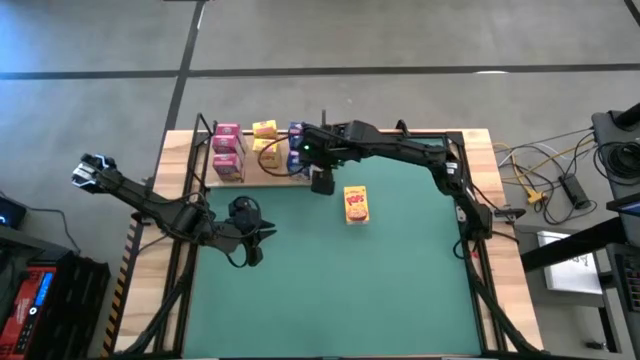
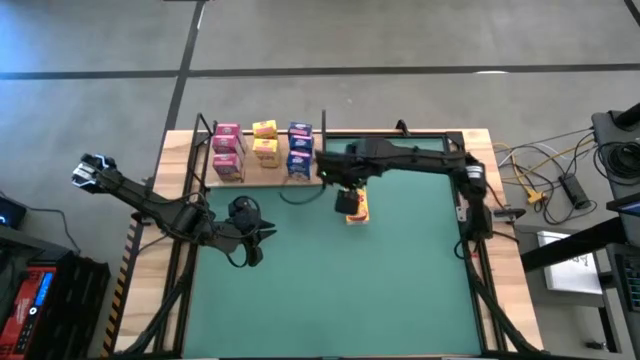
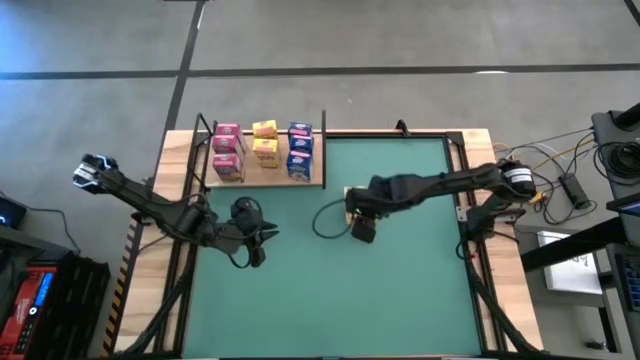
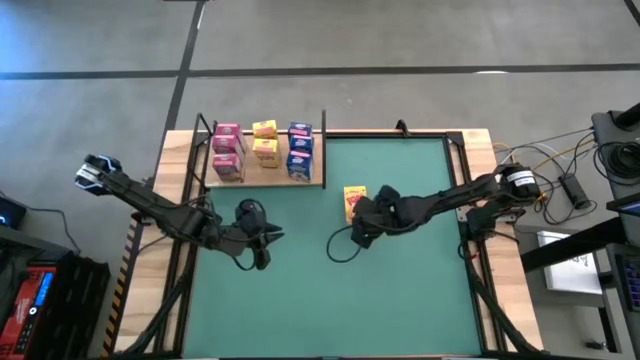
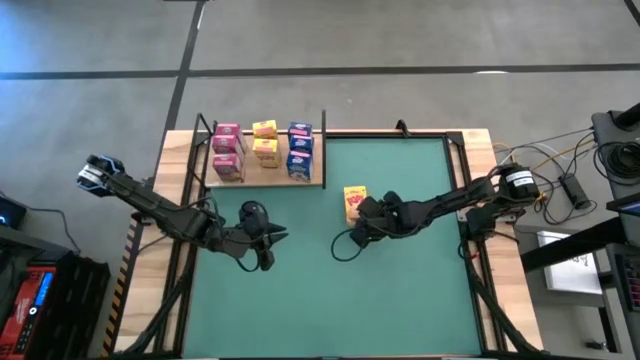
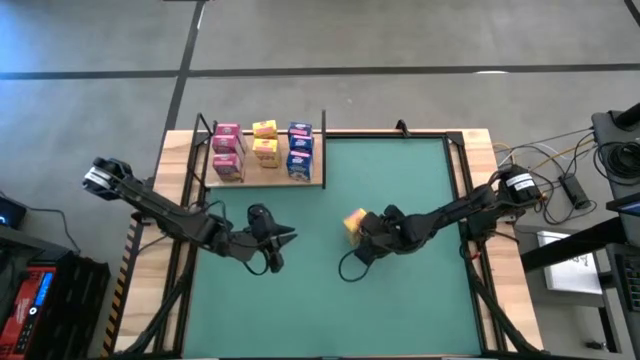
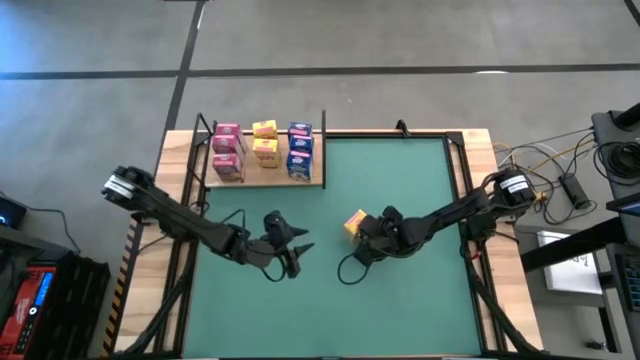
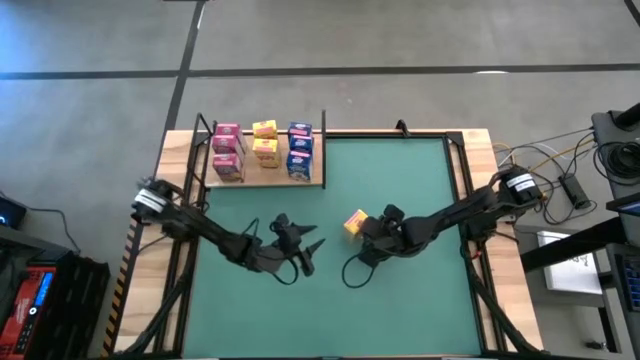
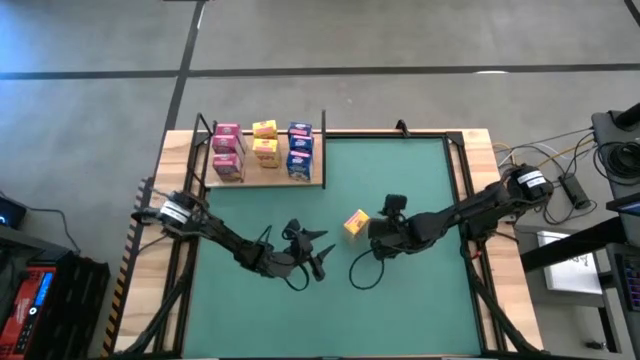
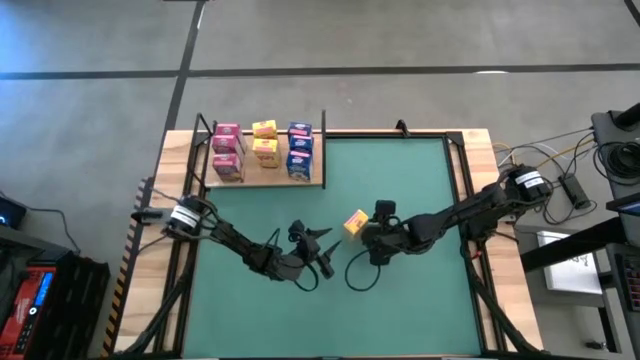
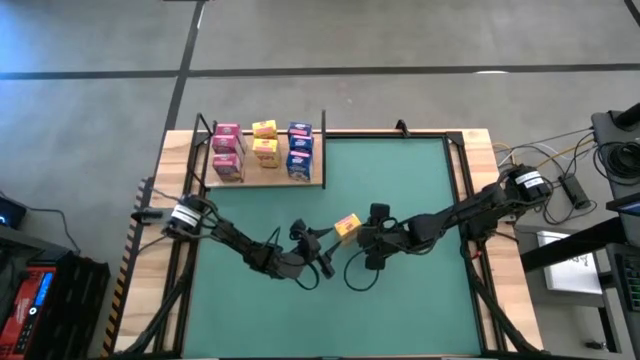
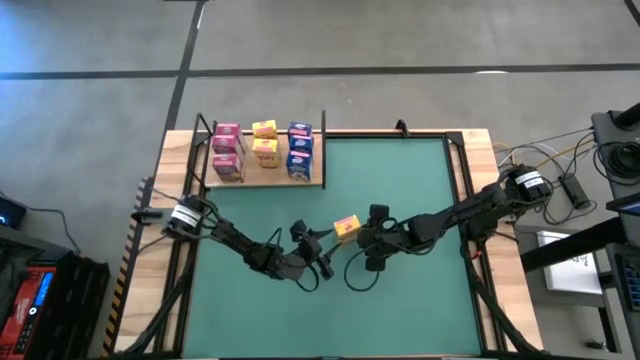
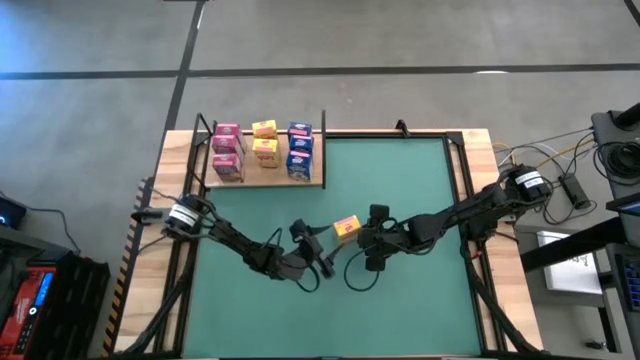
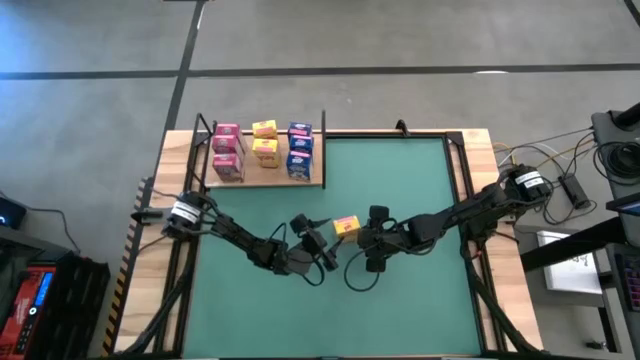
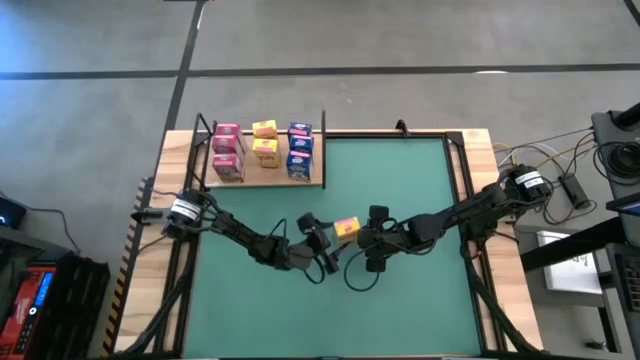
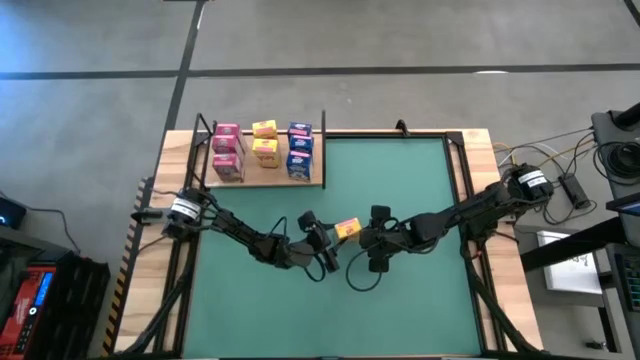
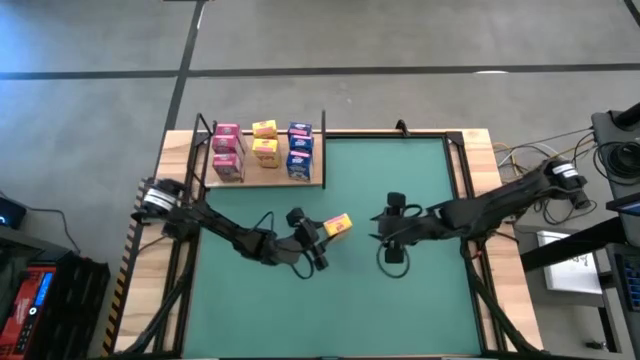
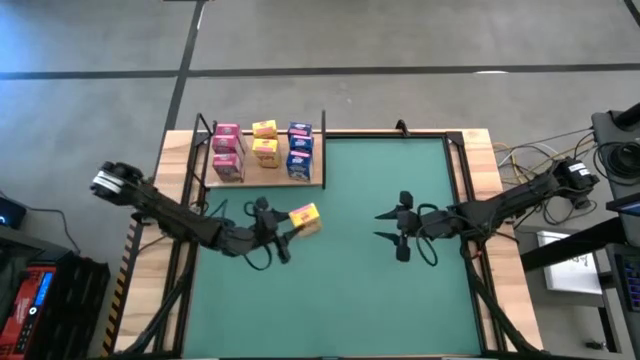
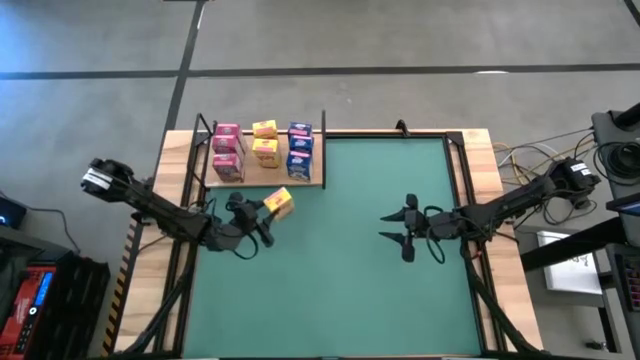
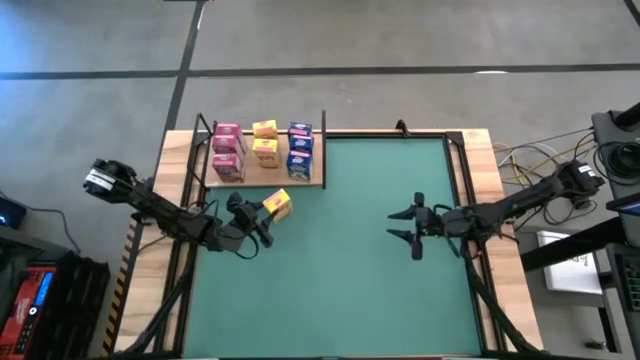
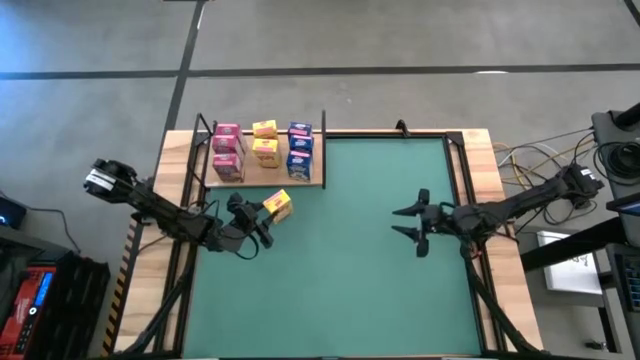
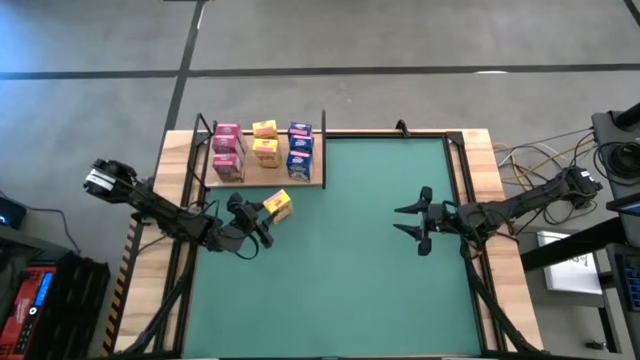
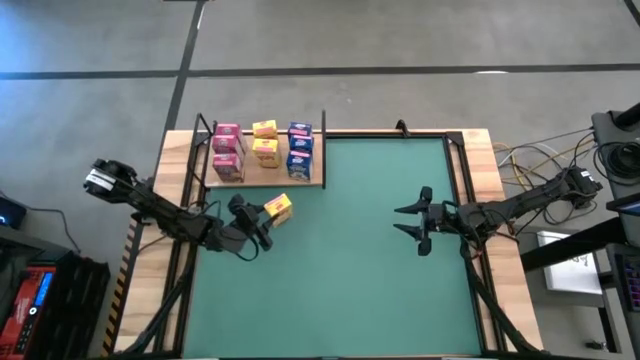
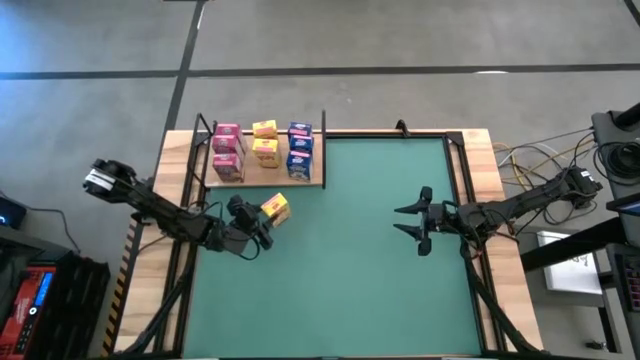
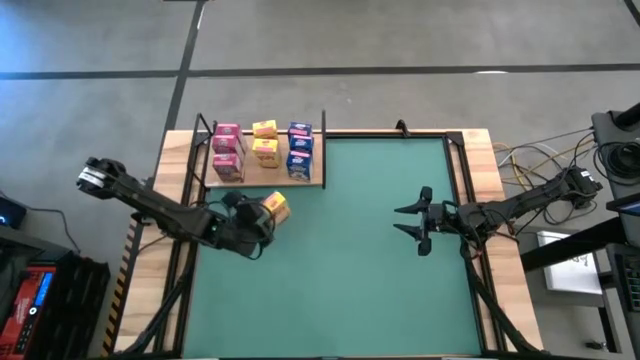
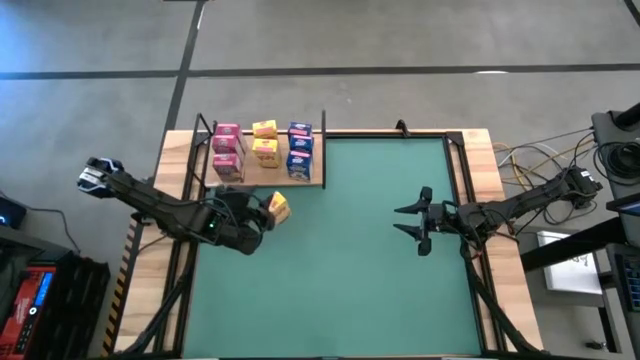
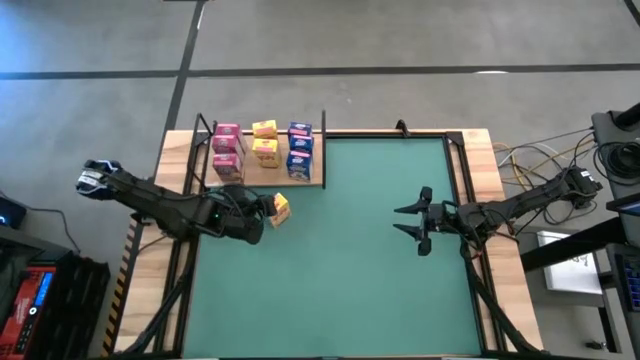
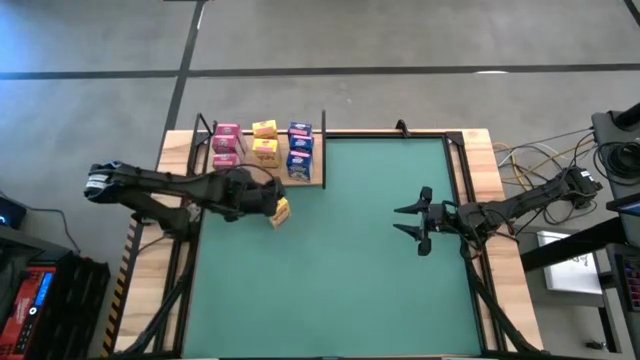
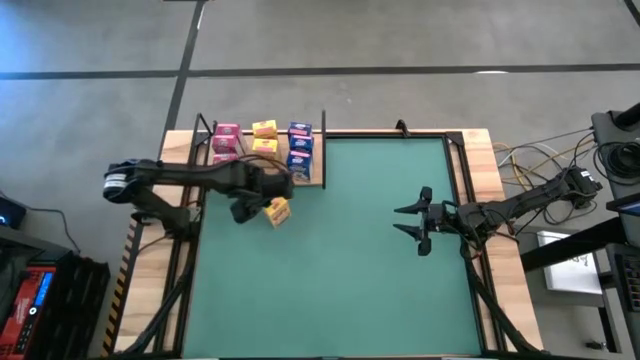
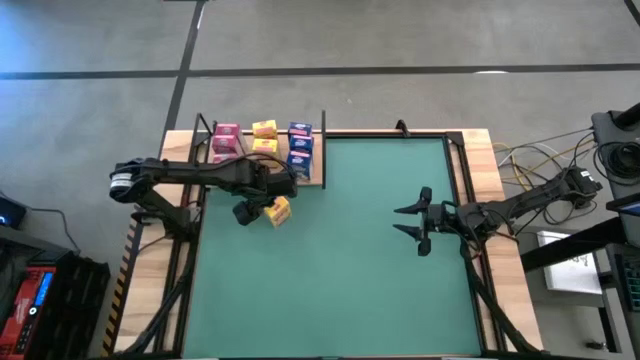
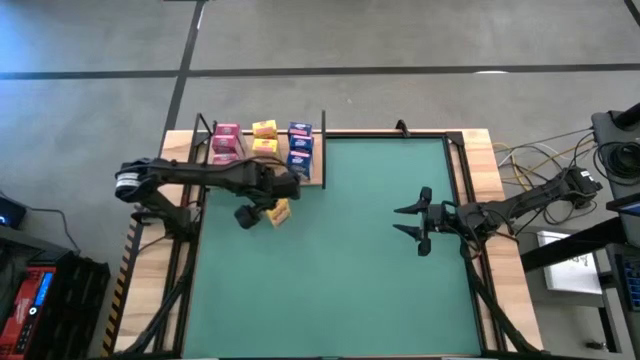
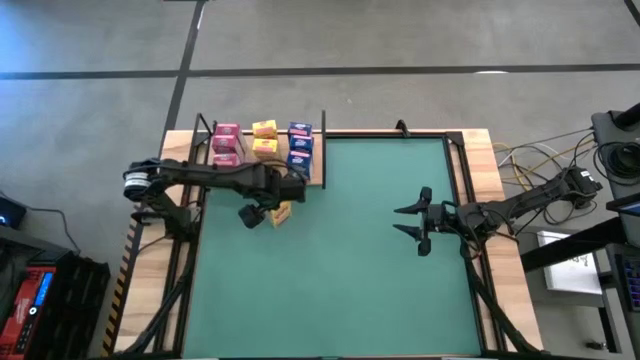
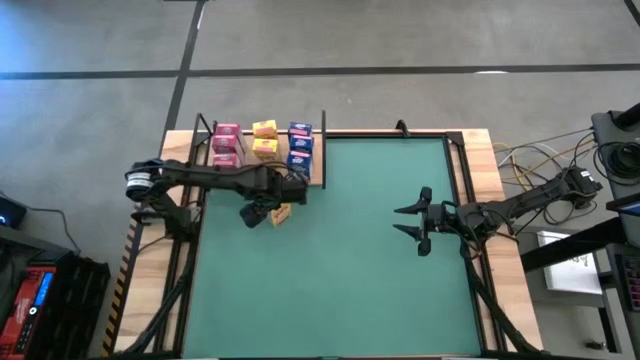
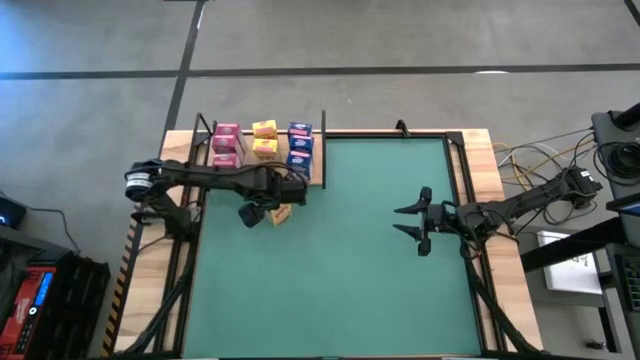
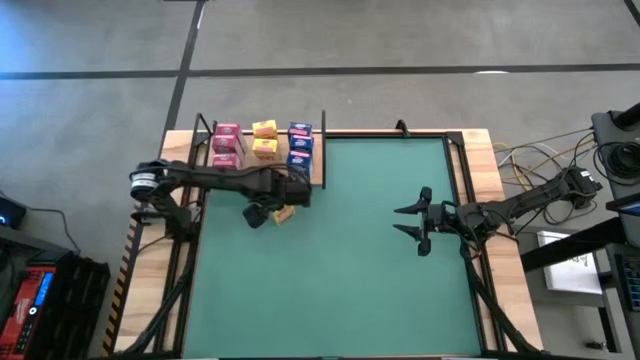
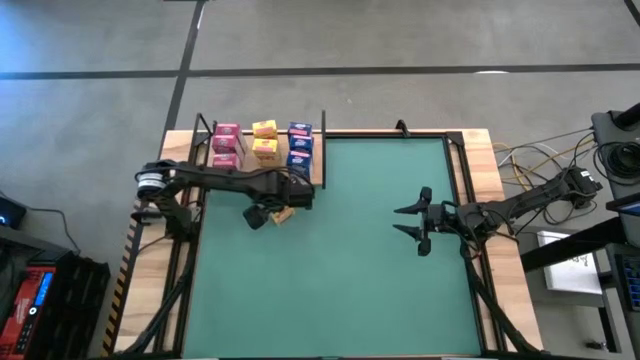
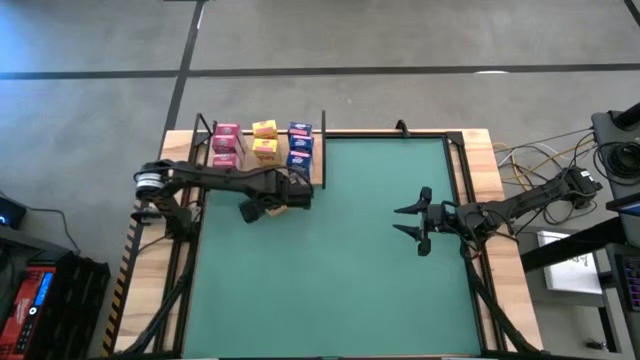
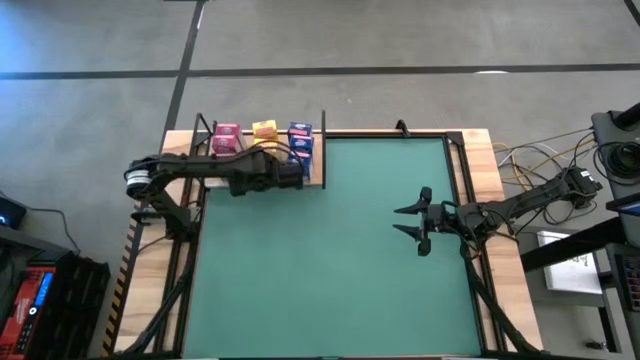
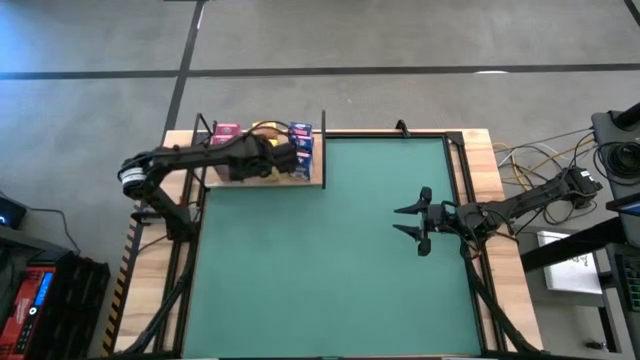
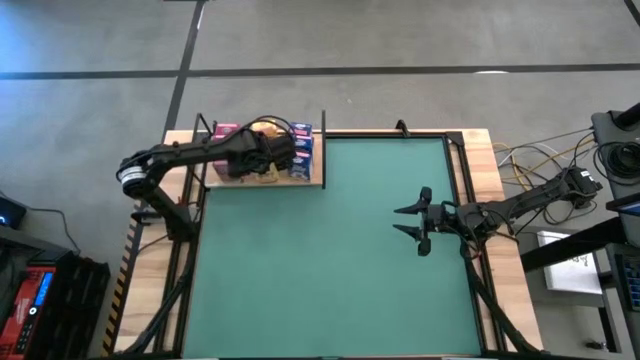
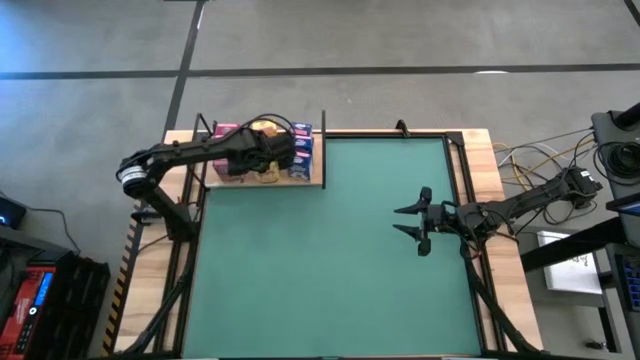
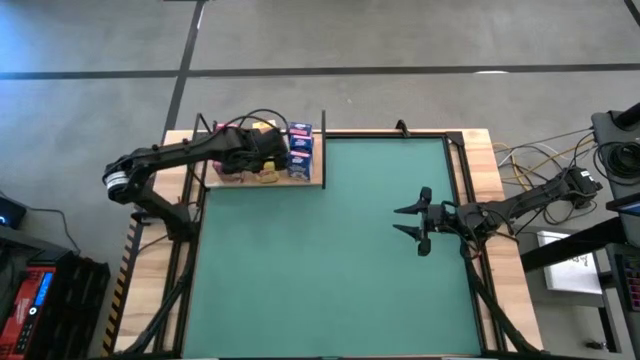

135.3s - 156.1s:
Task: Stack cereal on shelf
Put the yellow cereal box on the shelf aligned with the yellow cereal boxes
